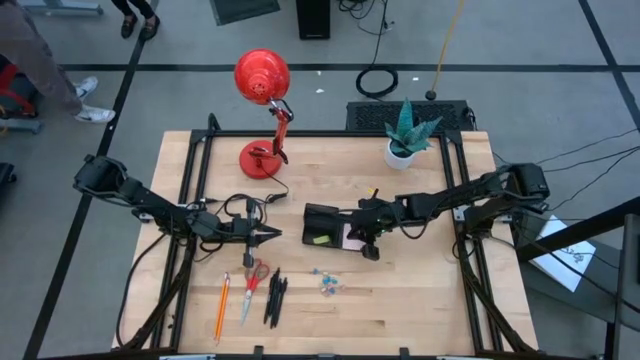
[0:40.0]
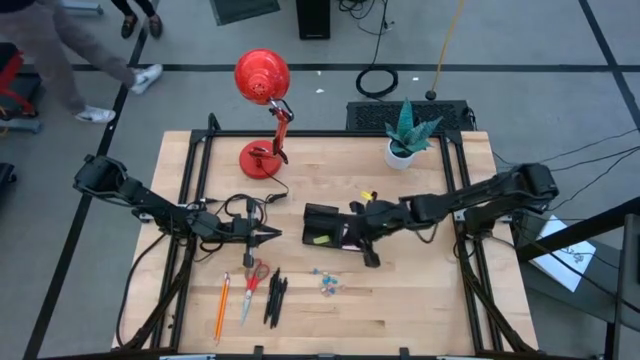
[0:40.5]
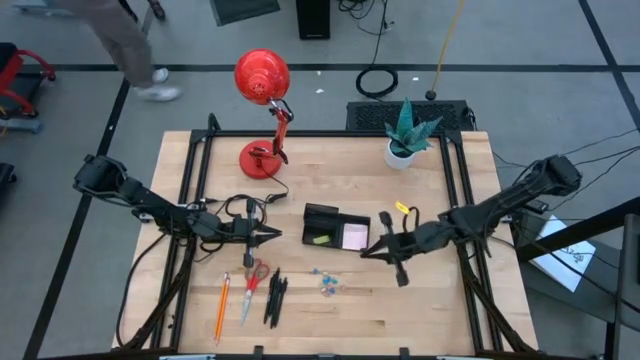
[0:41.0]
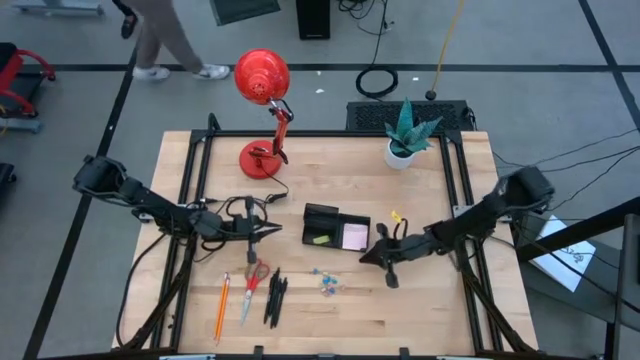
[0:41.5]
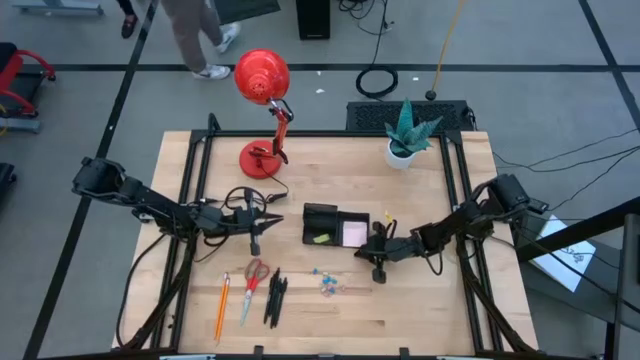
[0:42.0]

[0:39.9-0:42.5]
Task: Pick and place office supplies into organizer
Adjust the black desk organizer

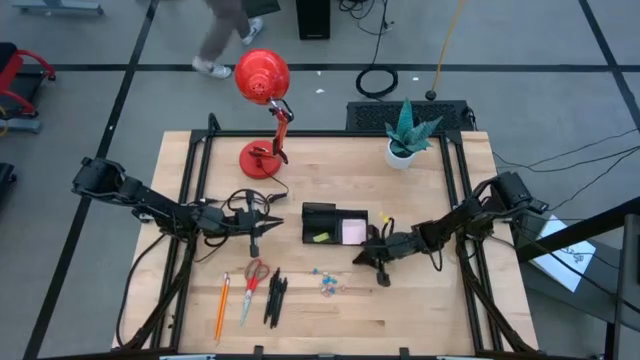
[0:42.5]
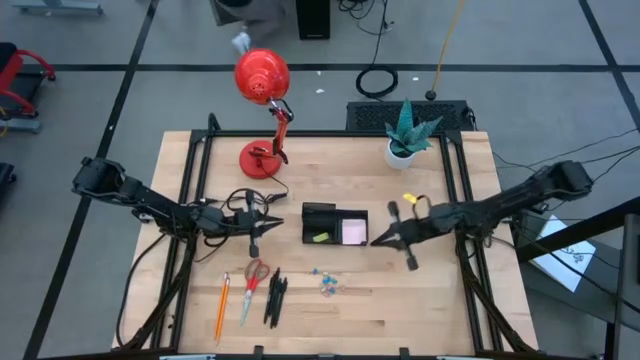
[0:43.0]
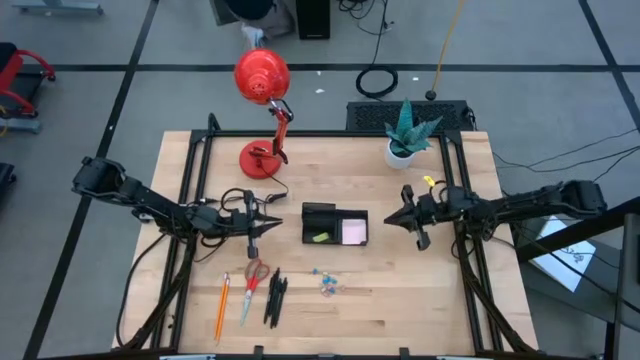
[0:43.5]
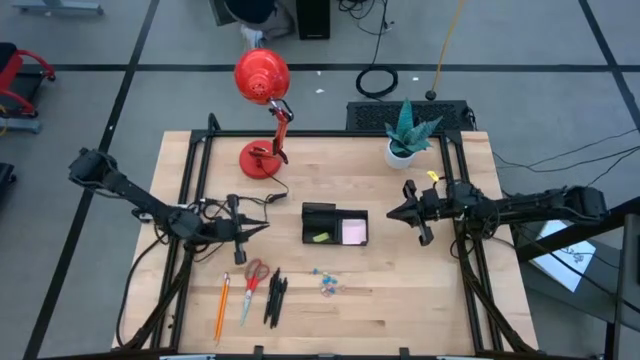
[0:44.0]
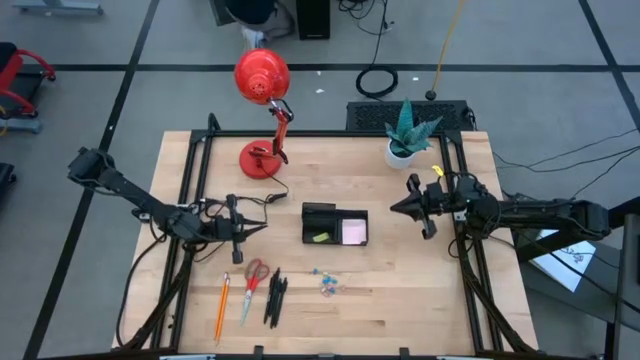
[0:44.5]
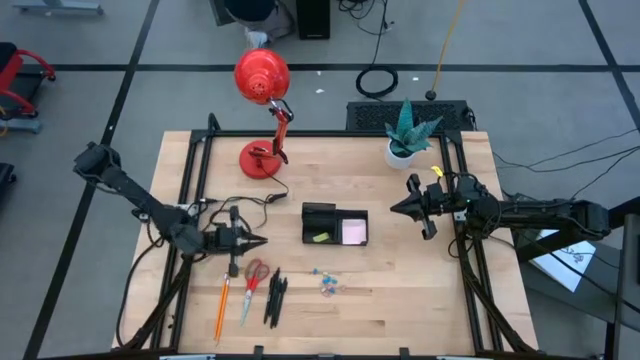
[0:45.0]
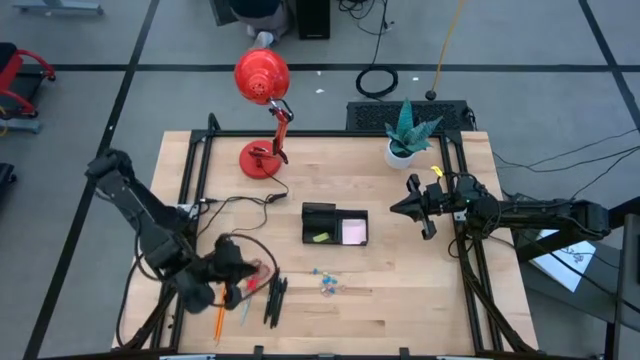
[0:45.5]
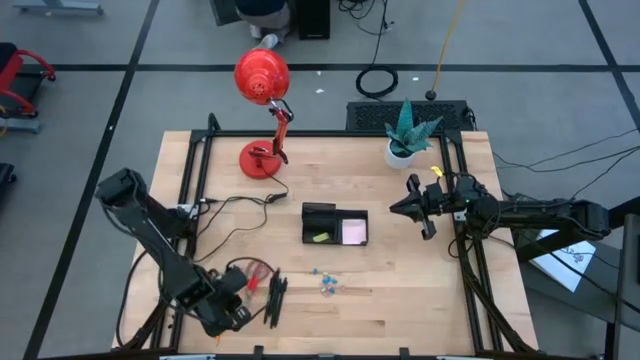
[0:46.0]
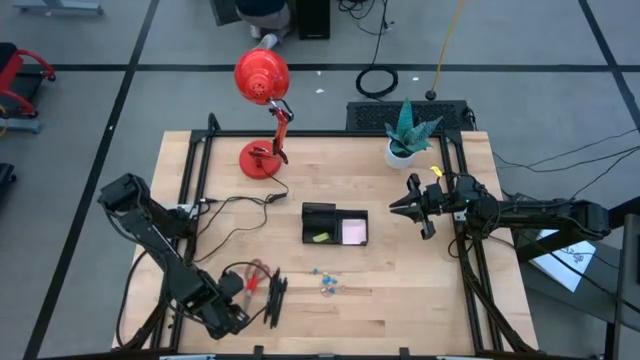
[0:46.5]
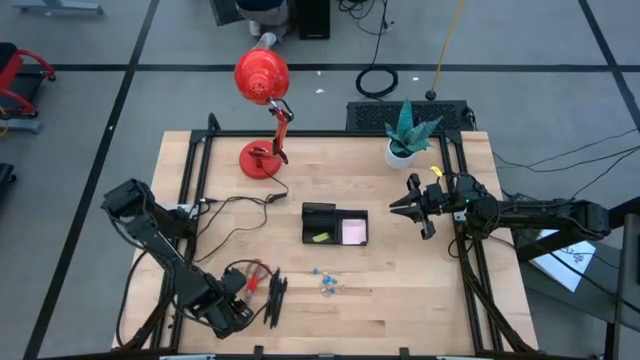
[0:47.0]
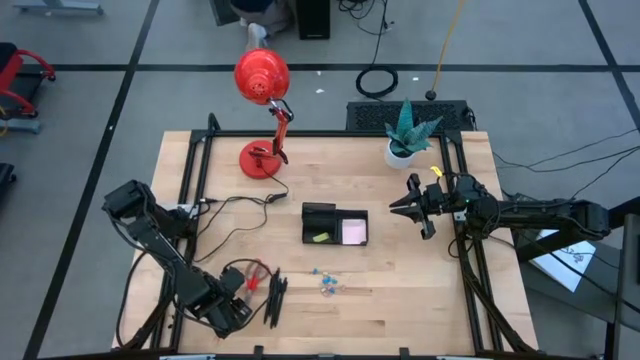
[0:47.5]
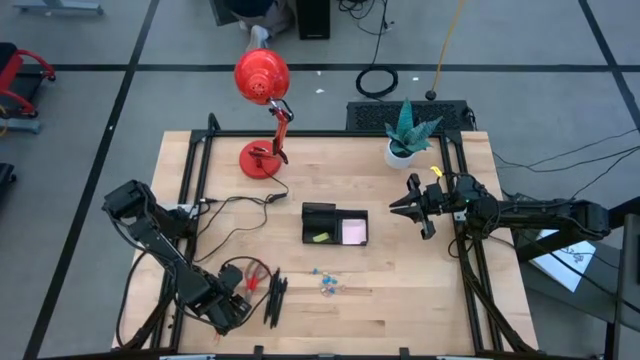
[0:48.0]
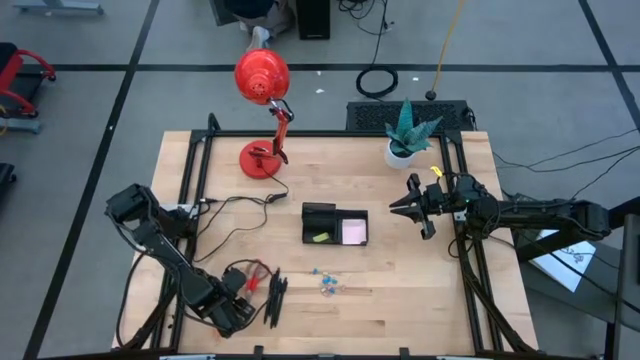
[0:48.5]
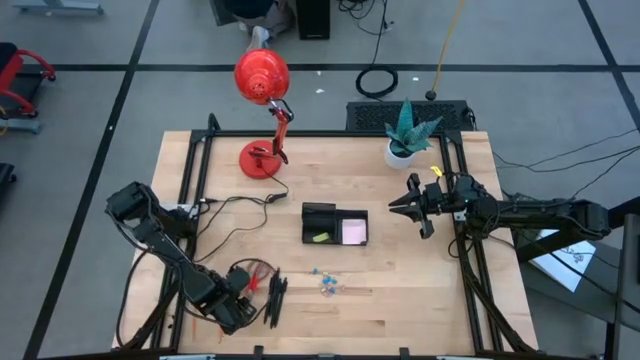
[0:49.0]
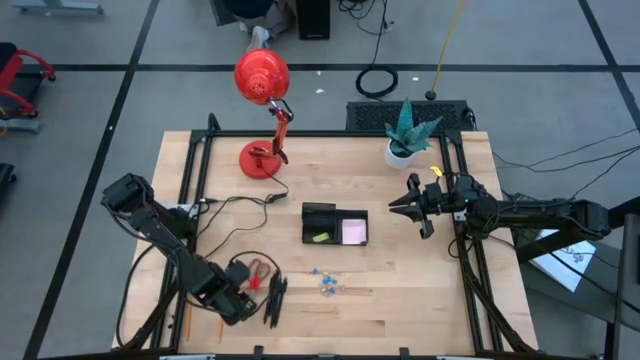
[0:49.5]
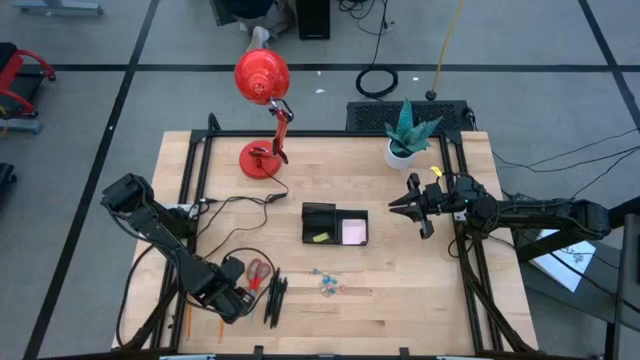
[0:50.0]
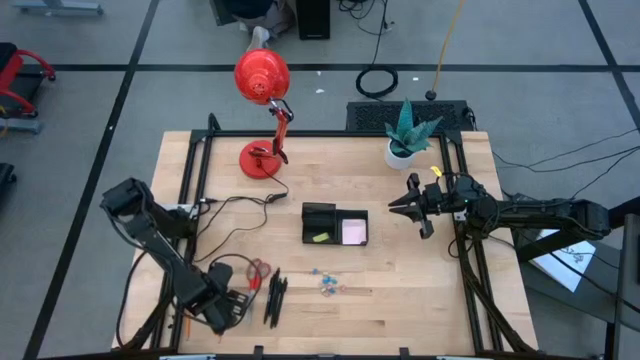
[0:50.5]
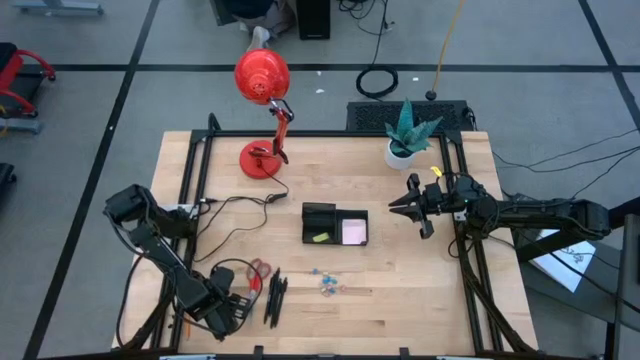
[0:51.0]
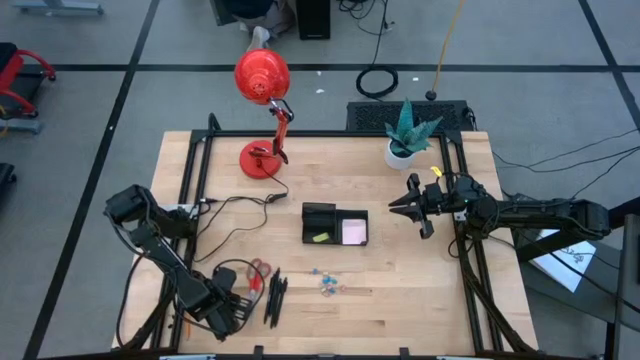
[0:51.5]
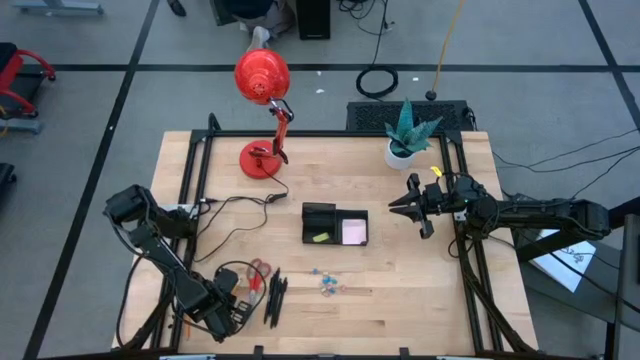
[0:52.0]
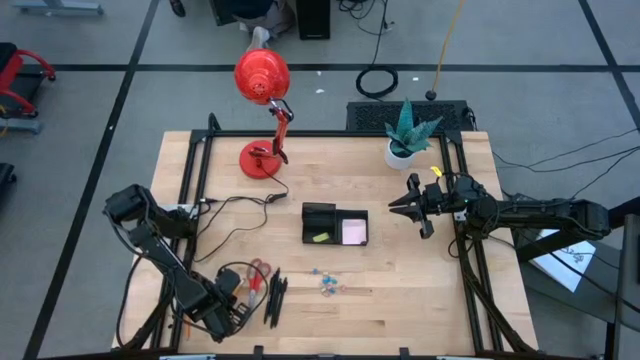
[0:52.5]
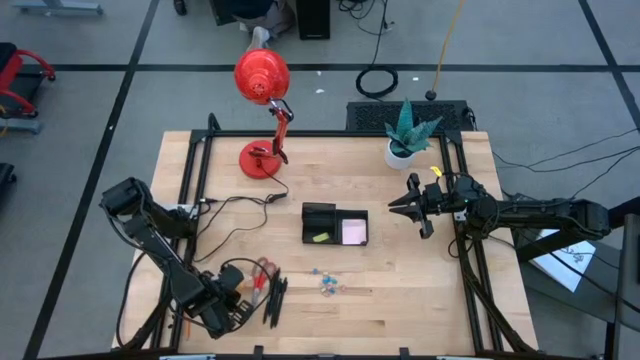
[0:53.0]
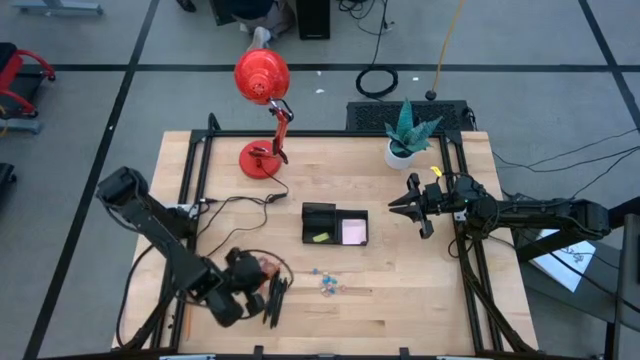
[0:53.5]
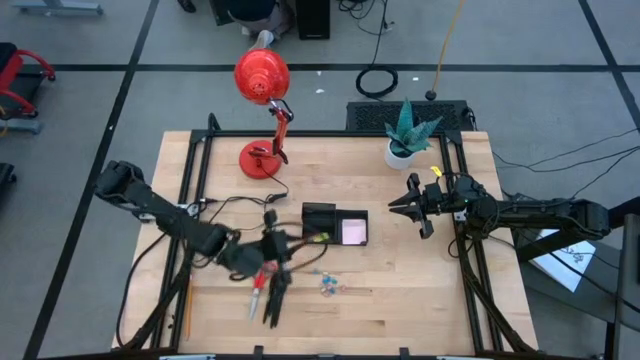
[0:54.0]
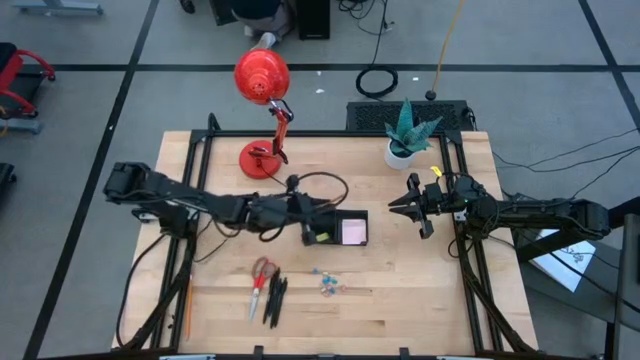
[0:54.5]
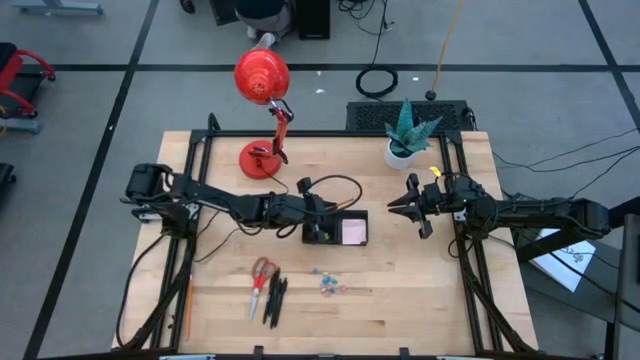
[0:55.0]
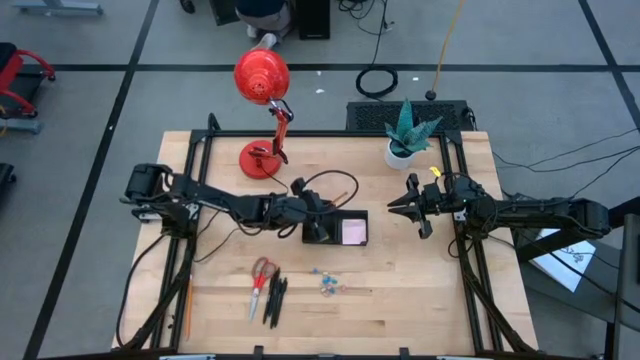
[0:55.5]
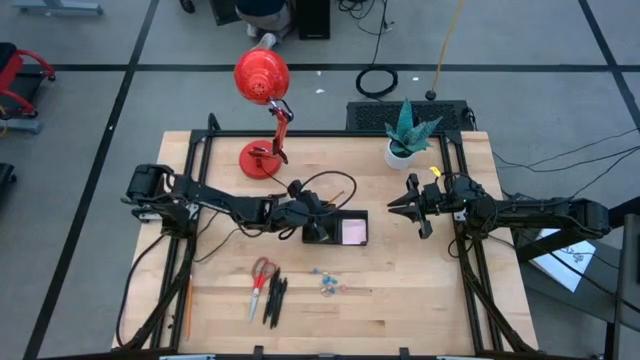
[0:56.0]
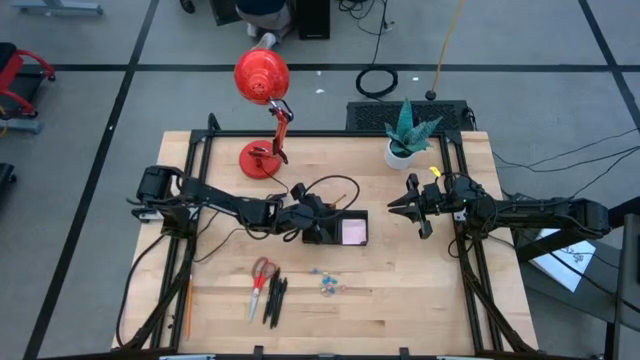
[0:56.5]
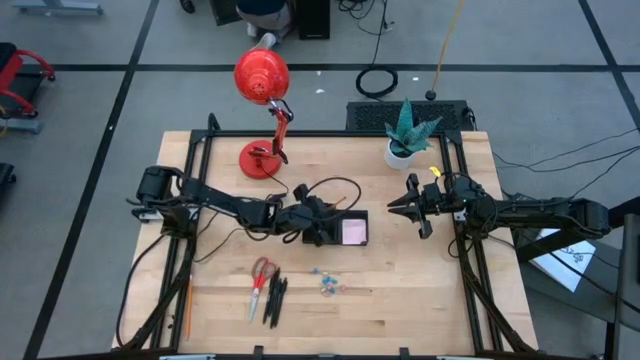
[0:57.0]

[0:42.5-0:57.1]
Put the orange pencil into the black desk organizer

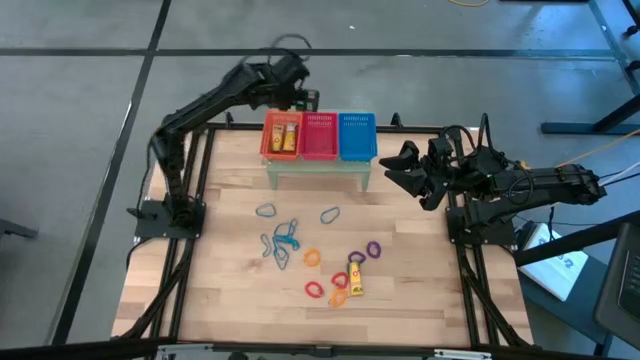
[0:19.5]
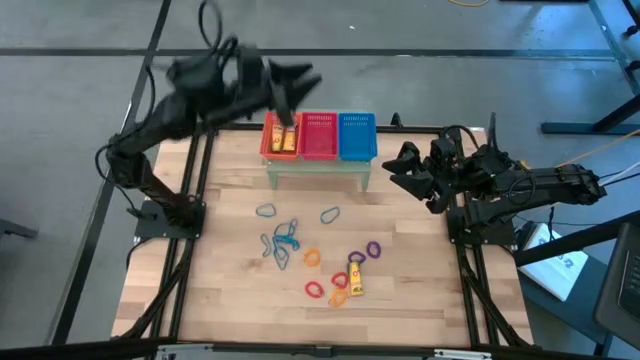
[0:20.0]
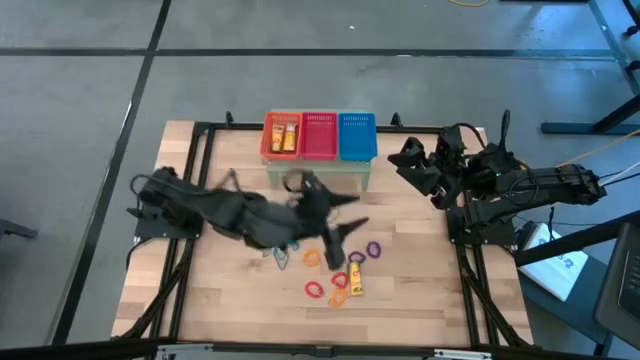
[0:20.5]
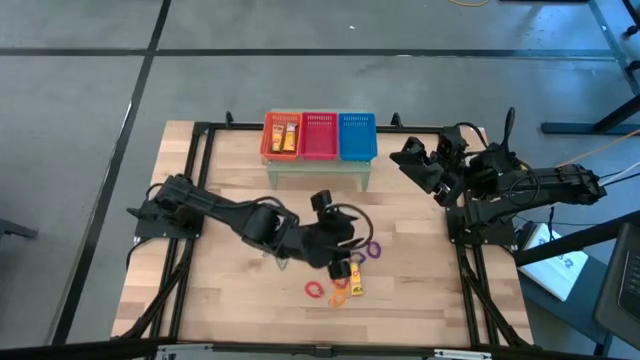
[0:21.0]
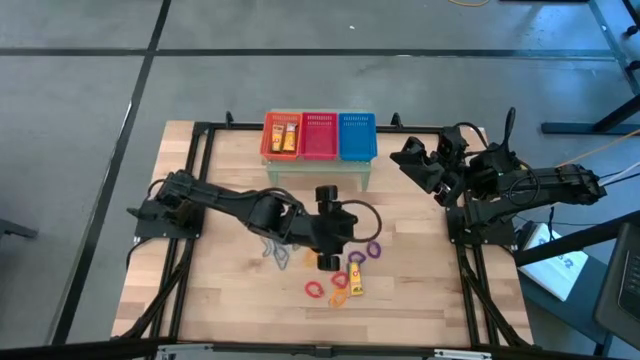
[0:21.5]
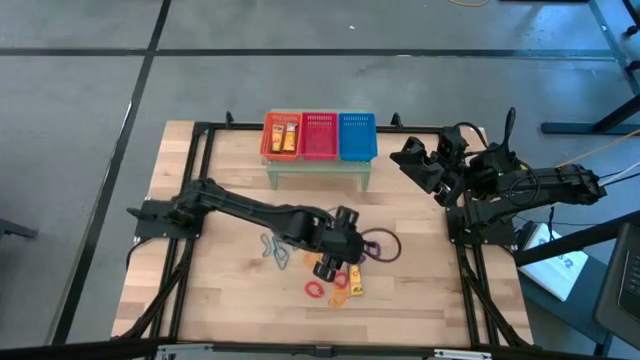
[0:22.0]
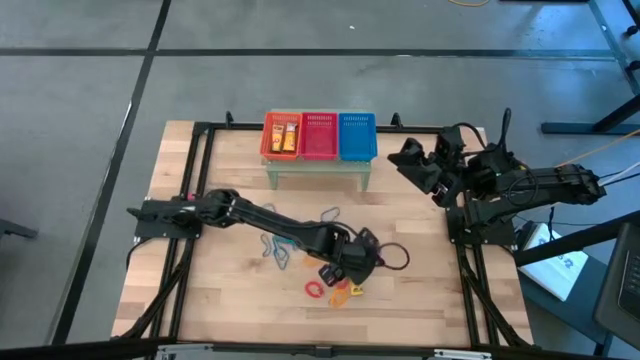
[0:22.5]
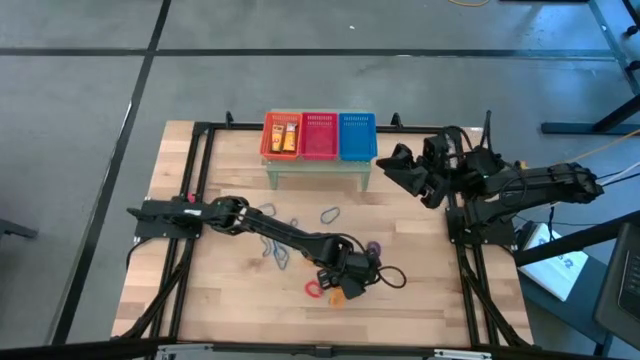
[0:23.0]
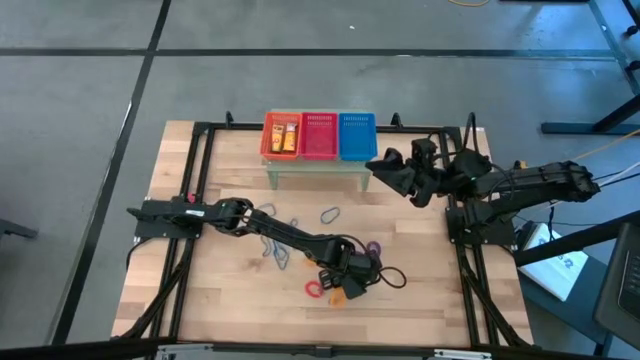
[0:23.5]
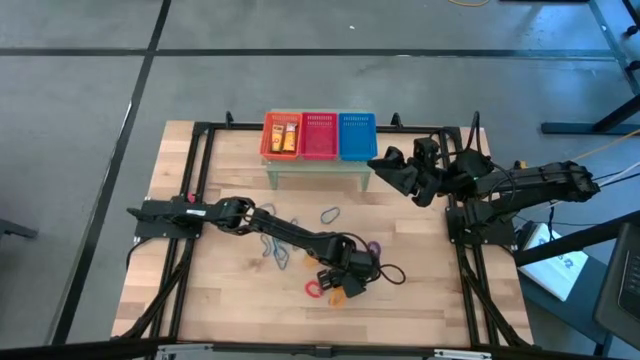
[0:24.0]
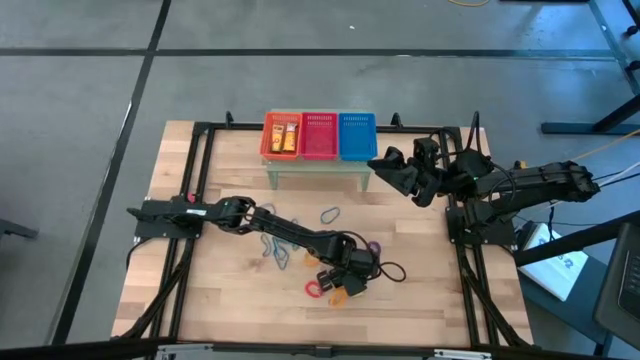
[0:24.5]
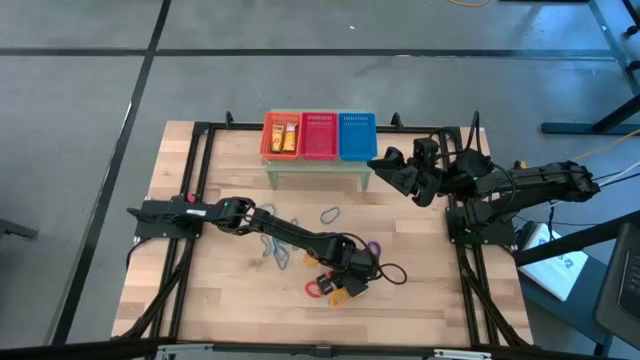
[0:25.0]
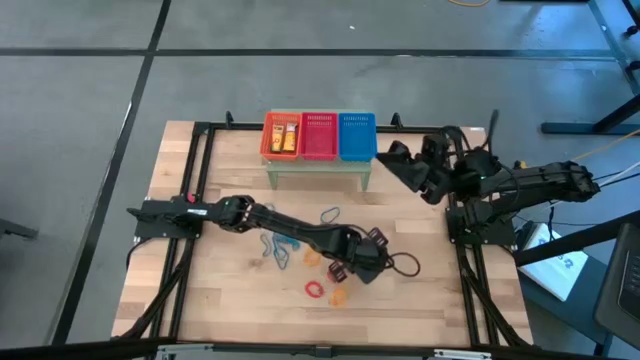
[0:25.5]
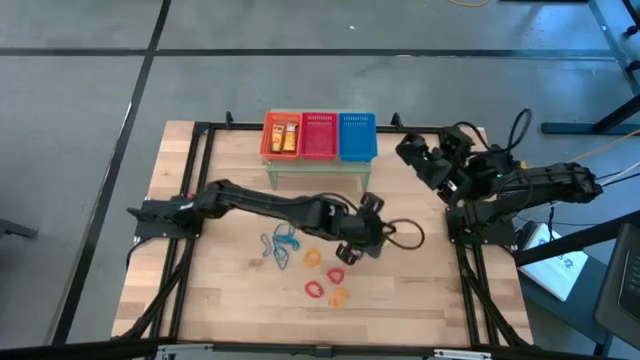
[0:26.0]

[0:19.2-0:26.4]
Task: Pick & Place Office Desk Supplies
Put the yellow box of crayon into the orange bin on the shelf
